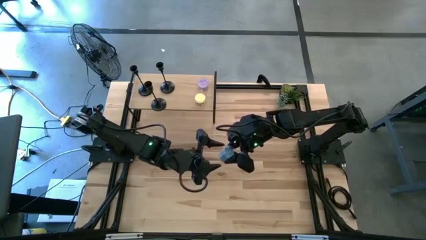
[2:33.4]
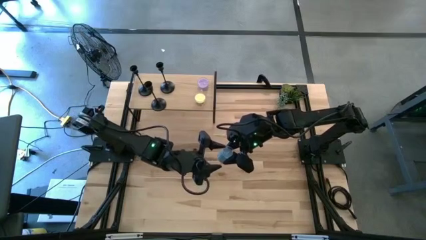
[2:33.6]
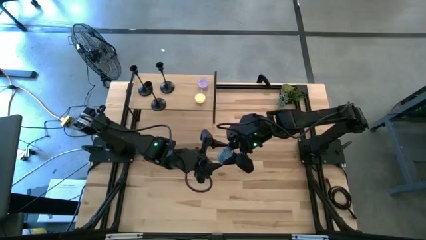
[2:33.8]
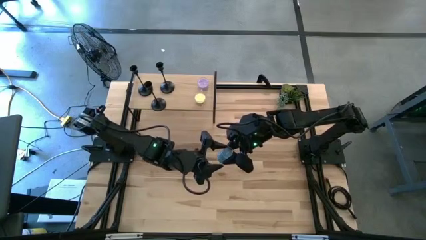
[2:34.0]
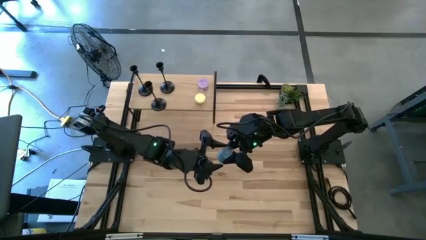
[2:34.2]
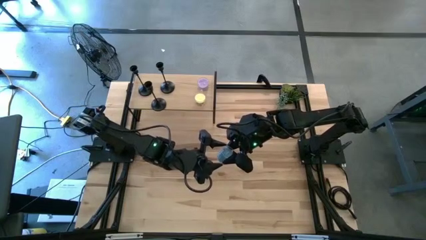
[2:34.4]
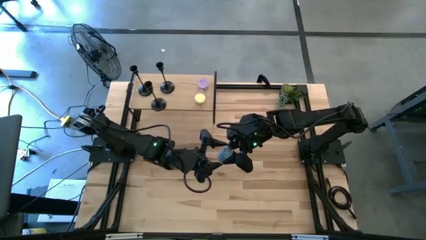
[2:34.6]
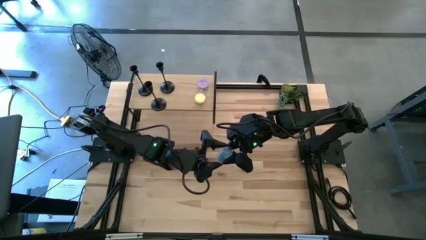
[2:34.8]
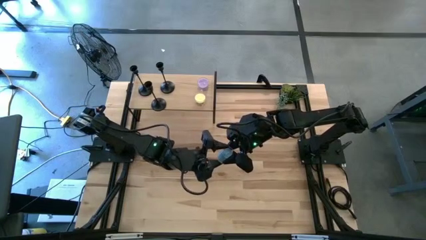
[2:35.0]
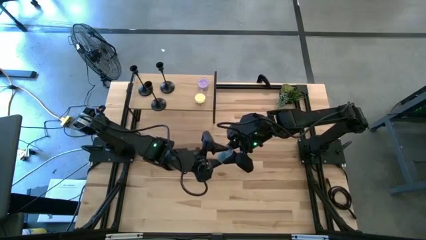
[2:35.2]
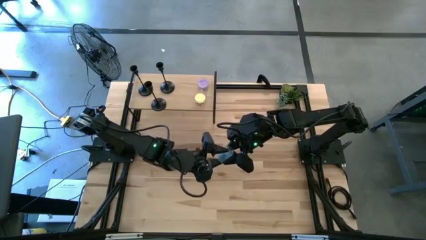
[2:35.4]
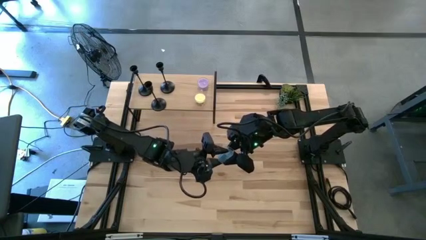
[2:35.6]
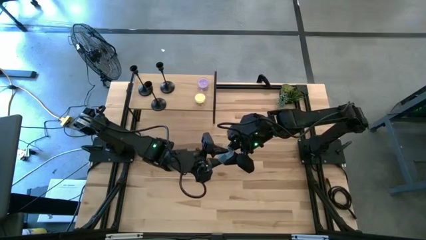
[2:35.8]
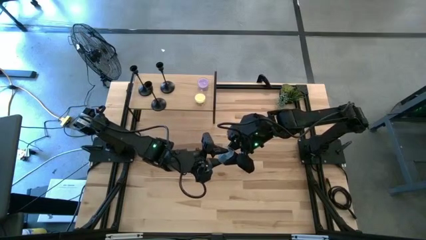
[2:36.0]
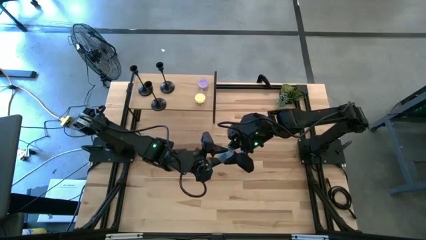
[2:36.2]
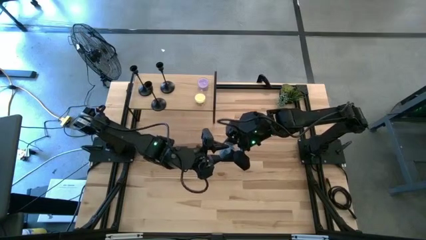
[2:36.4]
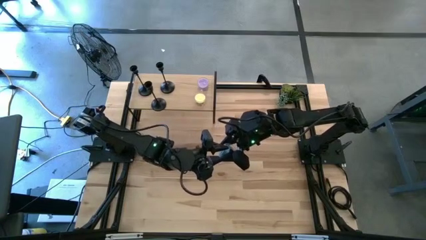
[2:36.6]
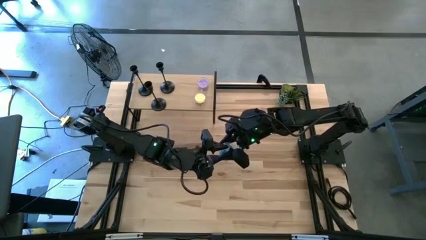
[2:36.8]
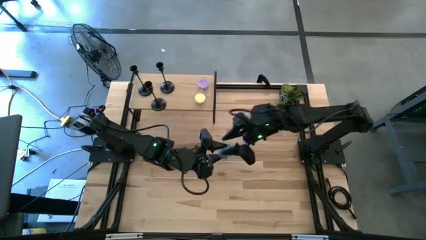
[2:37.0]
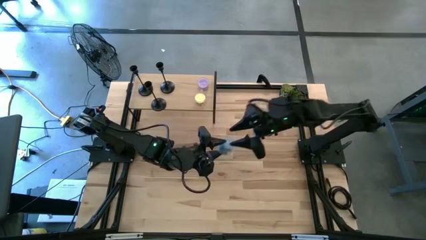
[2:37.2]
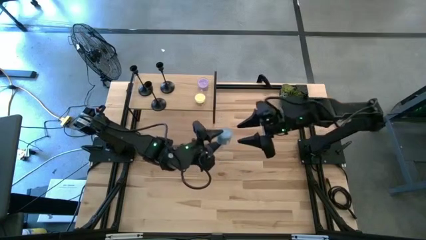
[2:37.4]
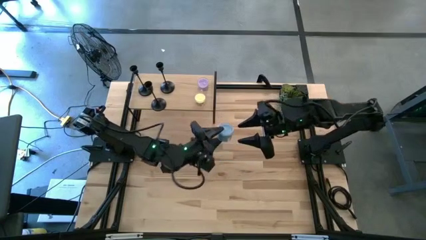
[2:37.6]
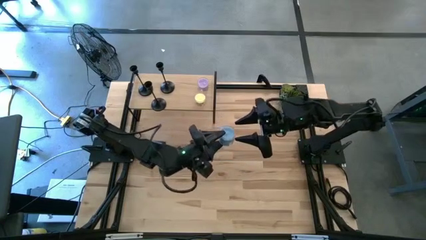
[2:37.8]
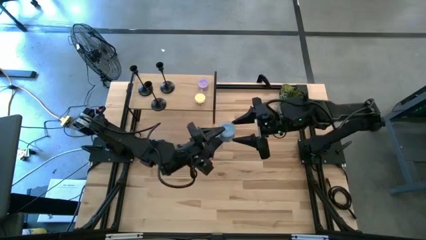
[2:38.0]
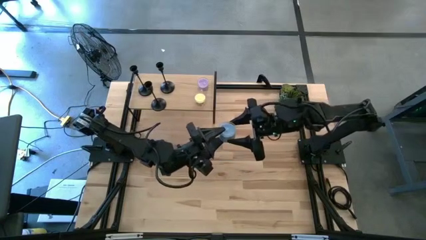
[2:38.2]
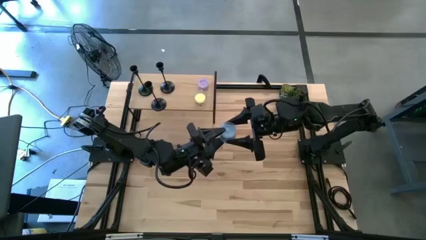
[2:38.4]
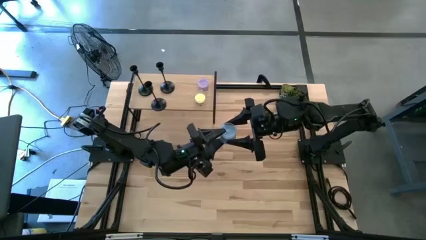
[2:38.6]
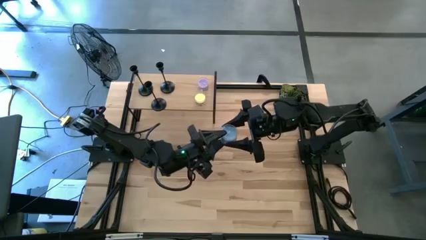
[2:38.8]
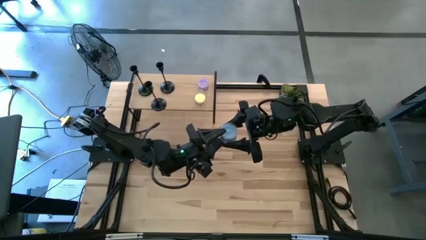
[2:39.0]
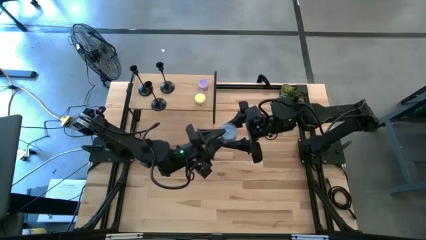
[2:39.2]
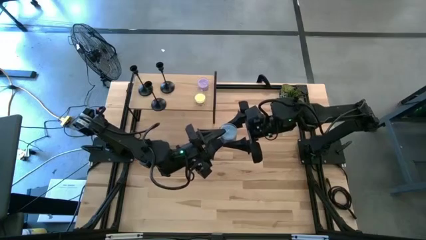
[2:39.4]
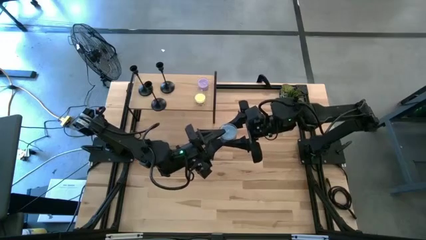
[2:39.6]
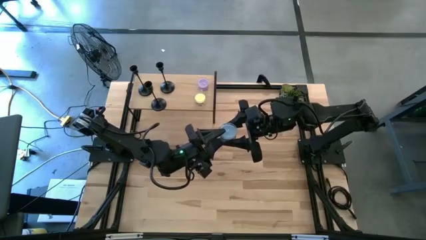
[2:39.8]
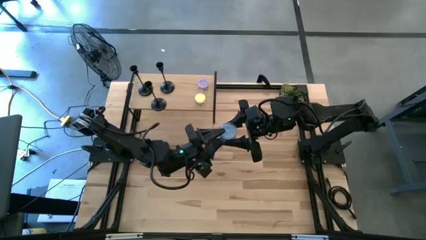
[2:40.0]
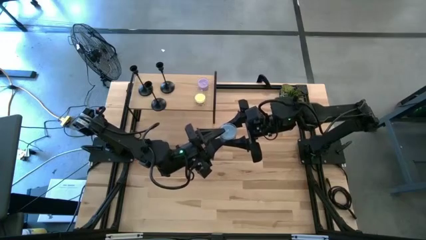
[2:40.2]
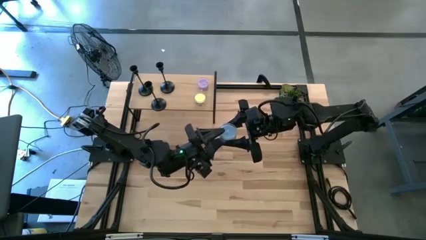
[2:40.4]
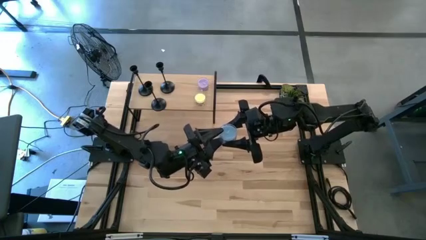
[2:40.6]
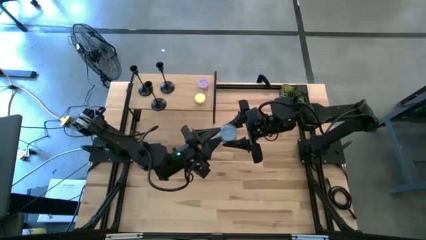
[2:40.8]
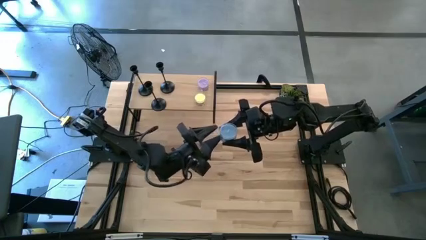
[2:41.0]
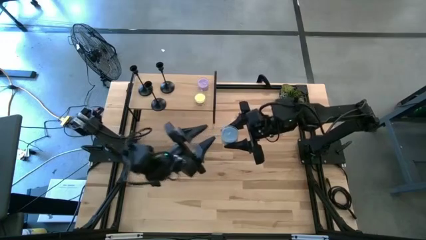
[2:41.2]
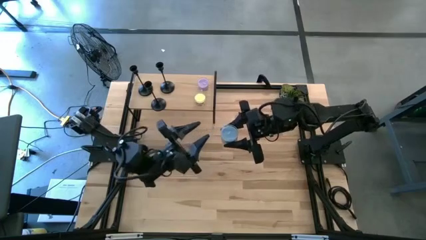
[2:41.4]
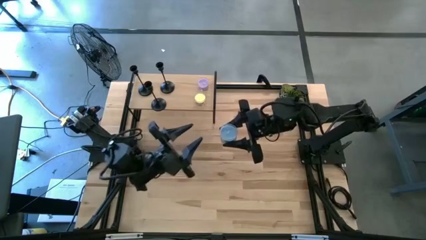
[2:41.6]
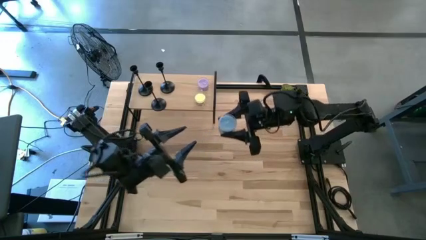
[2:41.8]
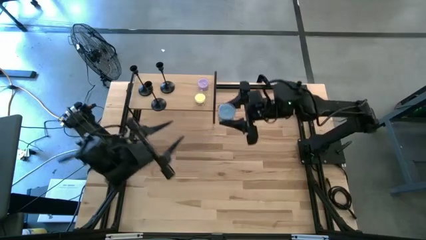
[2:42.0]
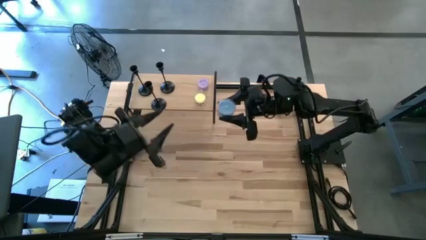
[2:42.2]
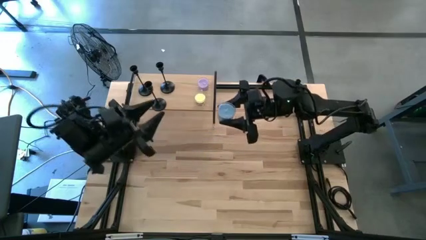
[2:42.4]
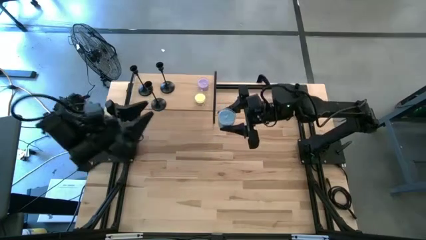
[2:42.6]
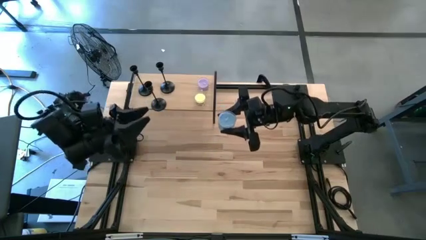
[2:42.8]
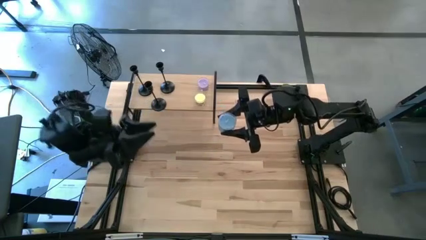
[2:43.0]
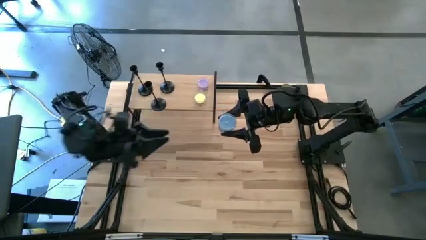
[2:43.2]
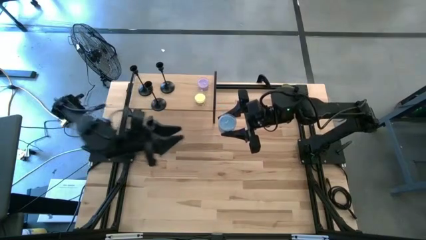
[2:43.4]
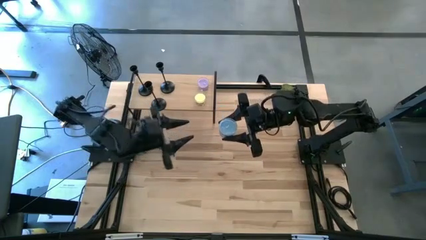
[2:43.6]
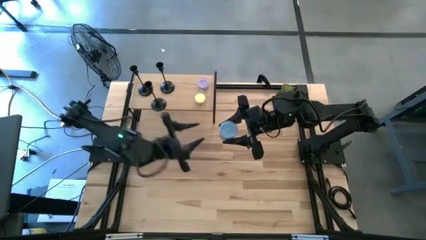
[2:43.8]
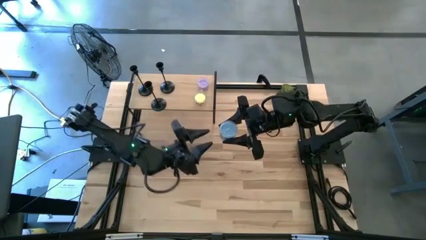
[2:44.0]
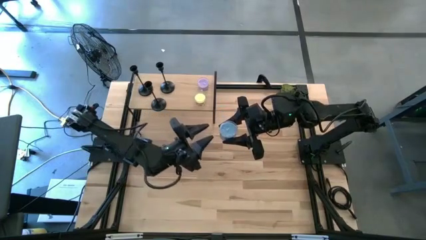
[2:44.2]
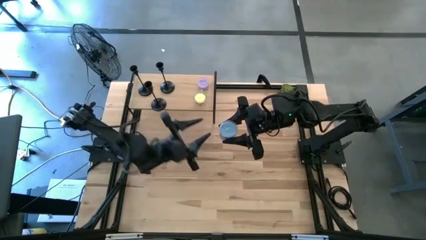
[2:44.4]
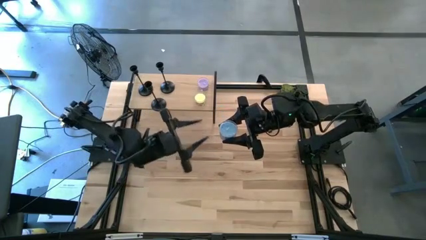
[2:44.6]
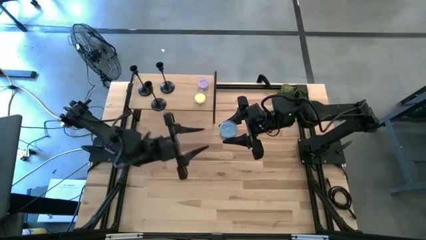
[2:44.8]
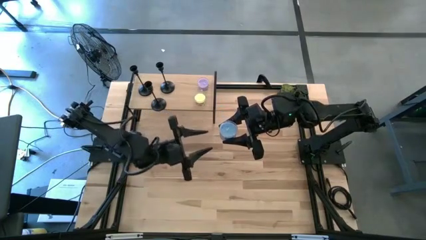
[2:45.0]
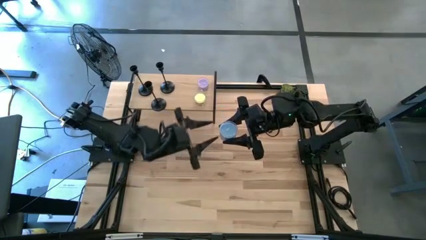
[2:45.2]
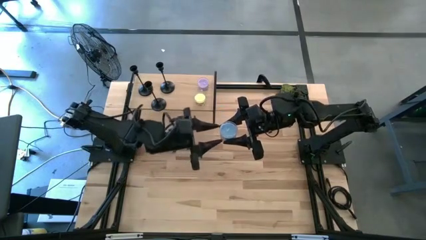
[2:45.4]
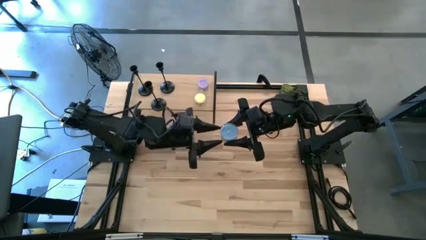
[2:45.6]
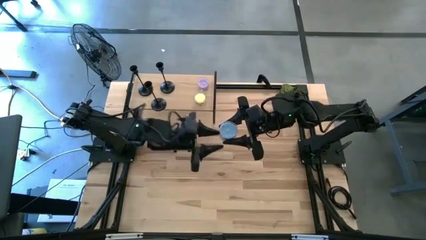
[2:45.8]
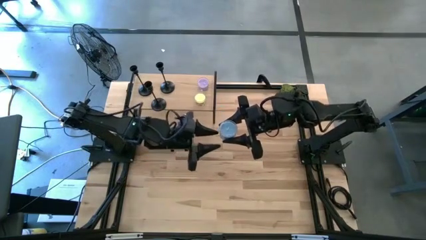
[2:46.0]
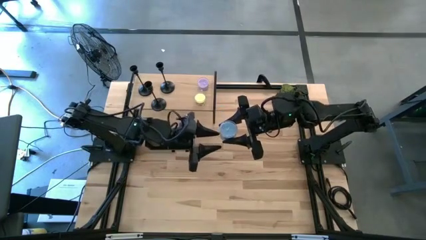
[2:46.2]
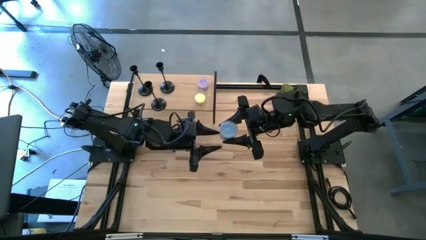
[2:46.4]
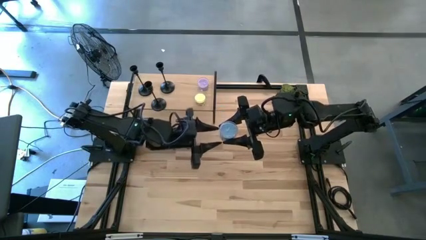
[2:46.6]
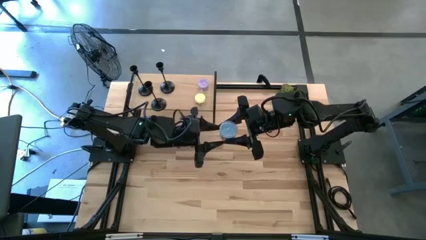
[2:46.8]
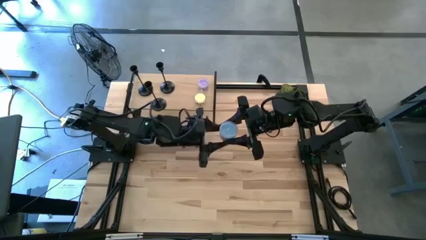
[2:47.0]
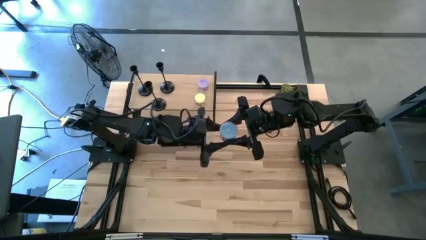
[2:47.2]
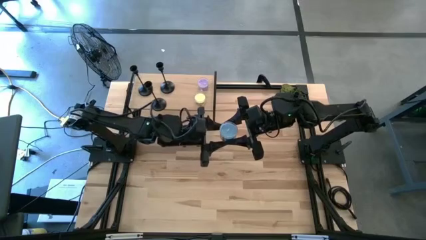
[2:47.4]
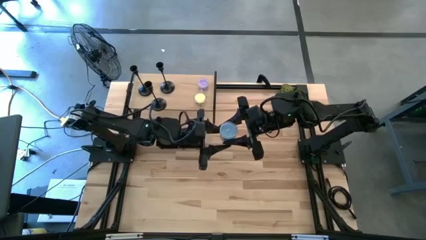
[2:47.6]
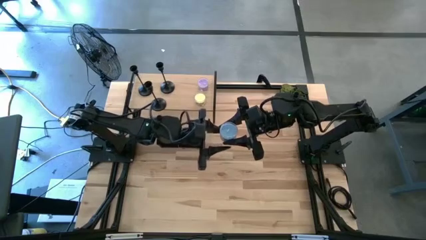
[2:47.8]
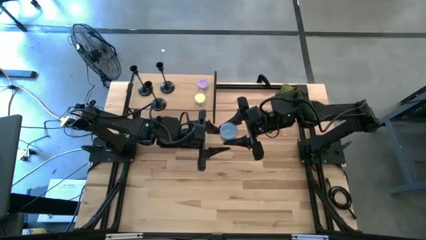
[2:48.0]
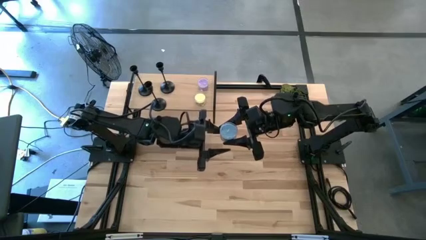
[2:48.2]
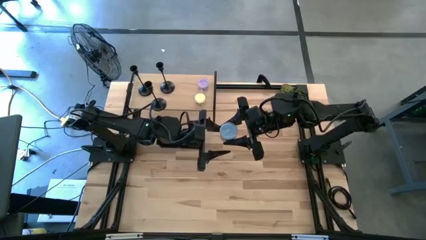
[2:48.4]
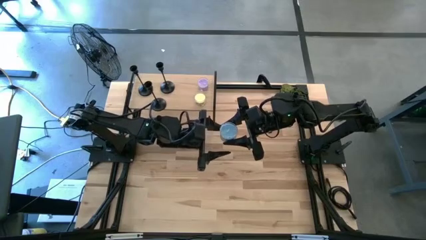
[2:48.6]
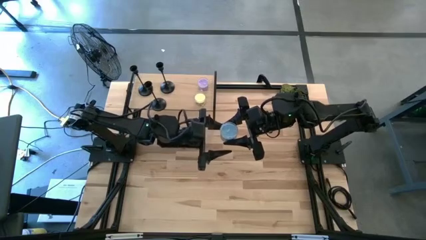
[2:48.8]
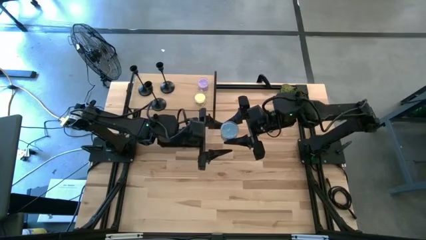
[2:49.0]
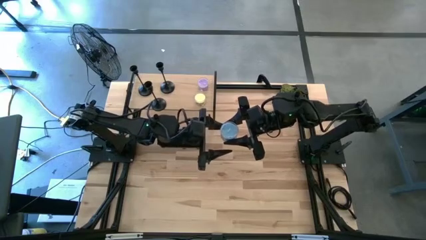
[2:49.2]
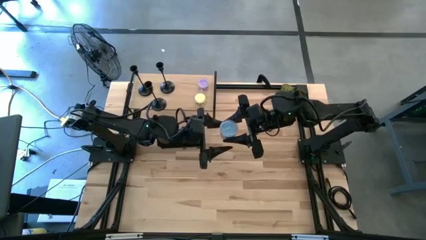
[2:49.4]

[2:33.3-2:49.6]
Task: Pick & Place candle stick holders
Put the blue candle on the shelf
